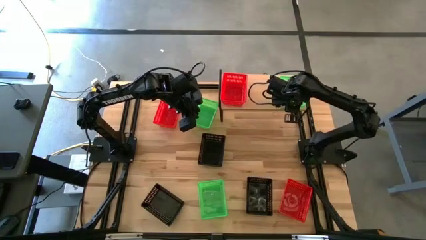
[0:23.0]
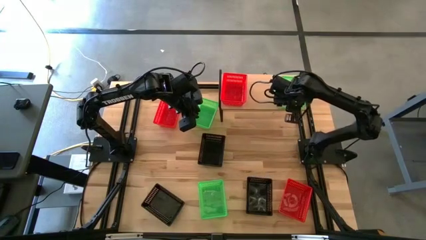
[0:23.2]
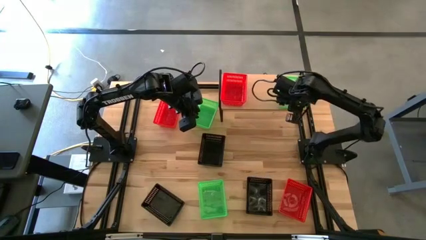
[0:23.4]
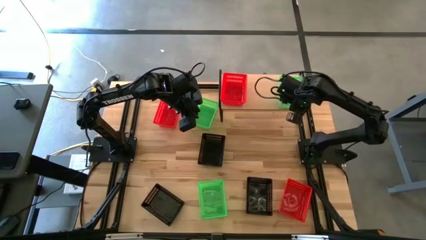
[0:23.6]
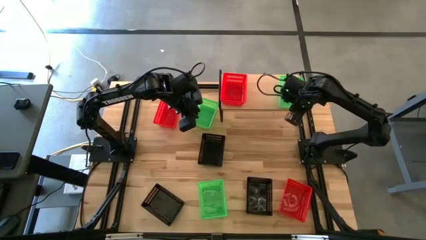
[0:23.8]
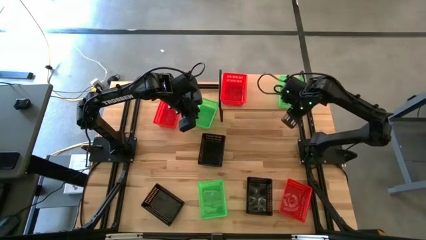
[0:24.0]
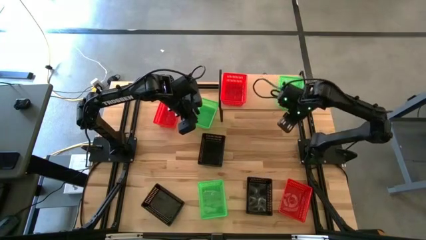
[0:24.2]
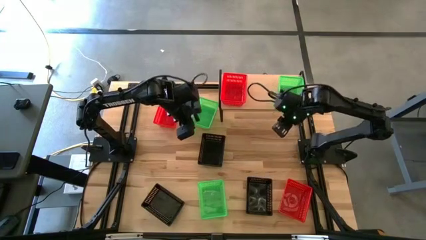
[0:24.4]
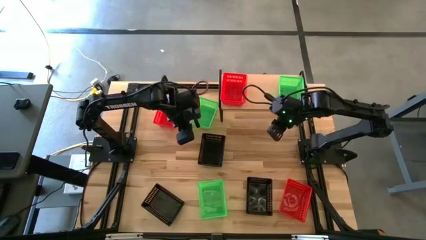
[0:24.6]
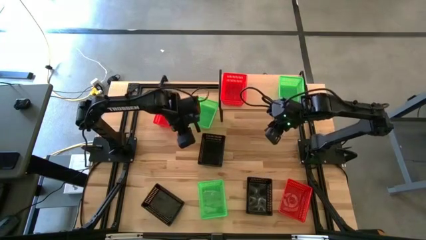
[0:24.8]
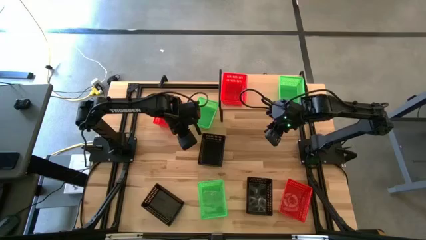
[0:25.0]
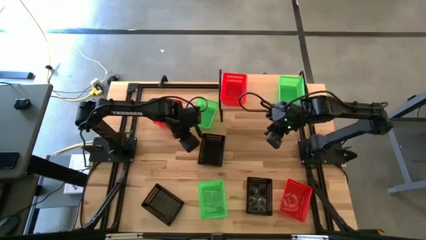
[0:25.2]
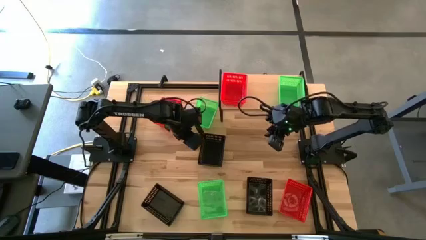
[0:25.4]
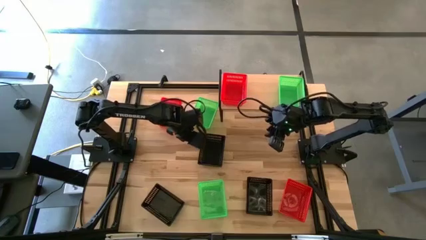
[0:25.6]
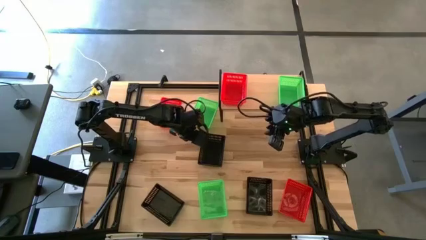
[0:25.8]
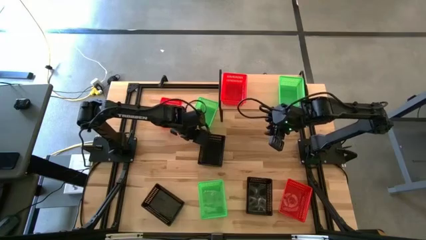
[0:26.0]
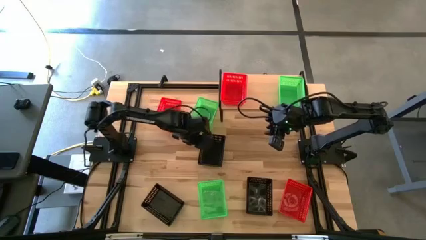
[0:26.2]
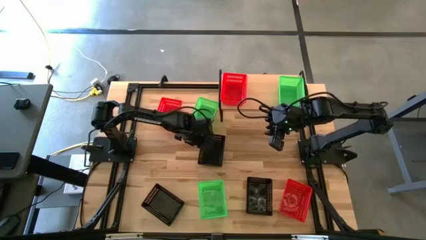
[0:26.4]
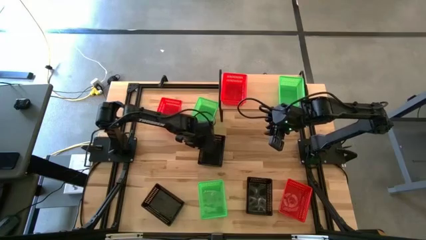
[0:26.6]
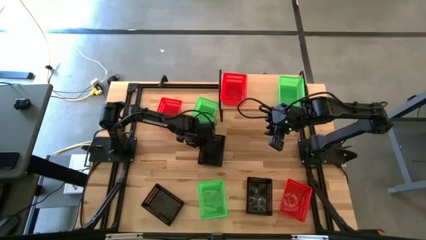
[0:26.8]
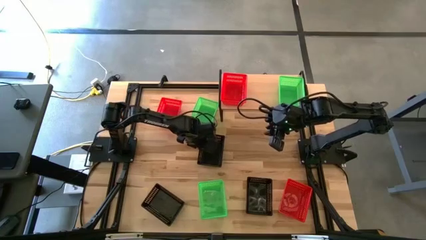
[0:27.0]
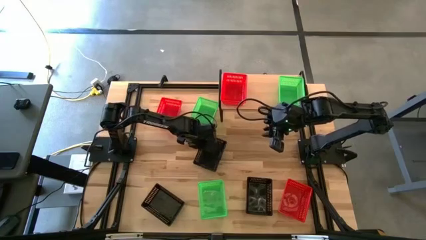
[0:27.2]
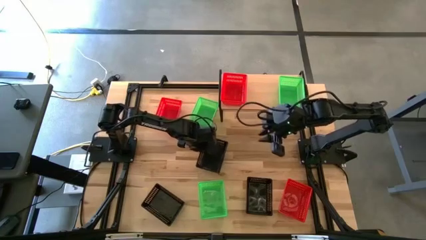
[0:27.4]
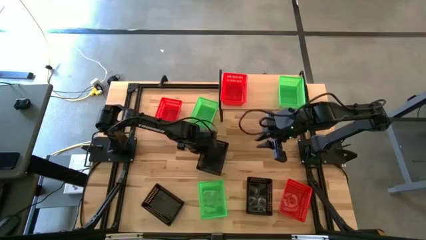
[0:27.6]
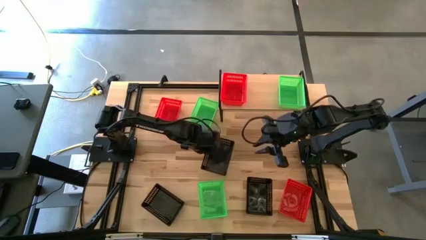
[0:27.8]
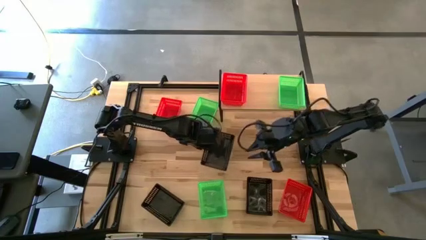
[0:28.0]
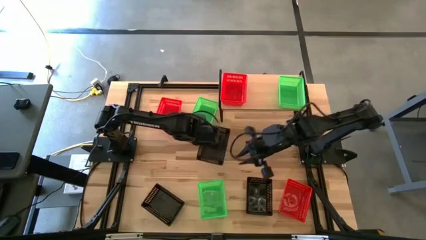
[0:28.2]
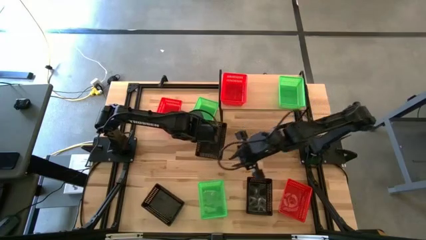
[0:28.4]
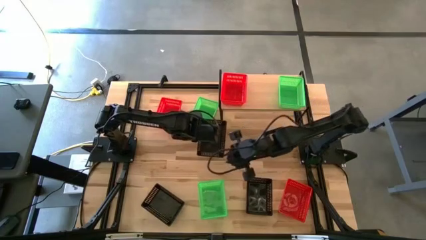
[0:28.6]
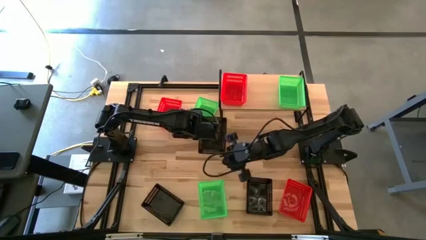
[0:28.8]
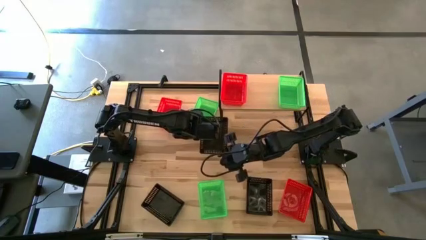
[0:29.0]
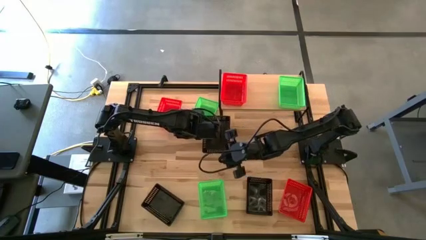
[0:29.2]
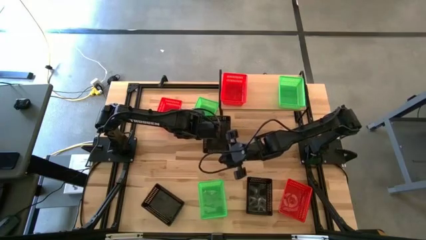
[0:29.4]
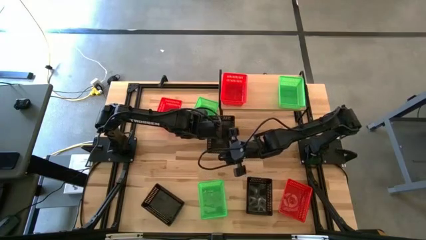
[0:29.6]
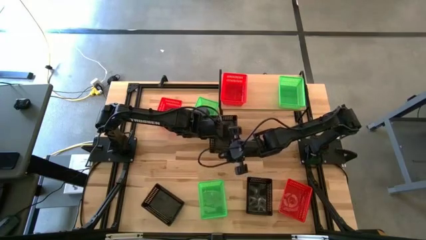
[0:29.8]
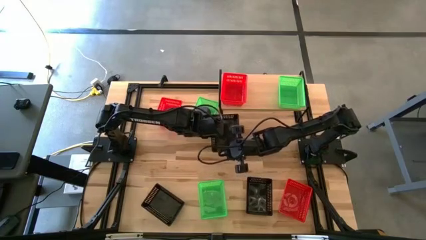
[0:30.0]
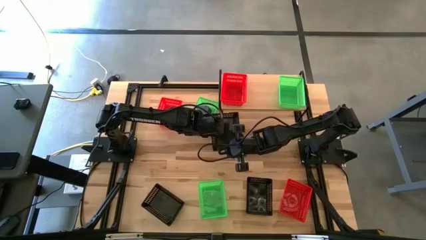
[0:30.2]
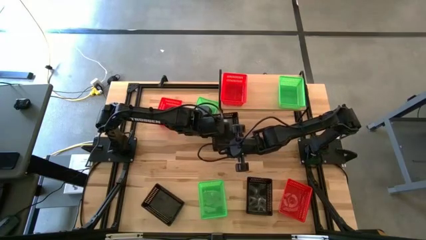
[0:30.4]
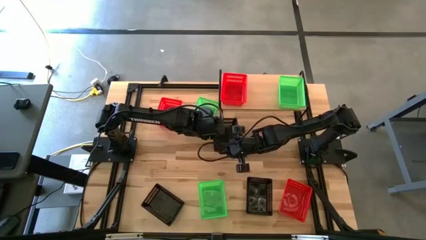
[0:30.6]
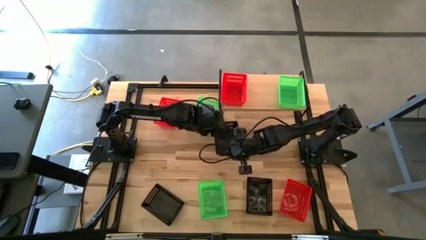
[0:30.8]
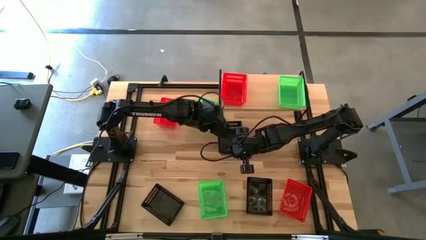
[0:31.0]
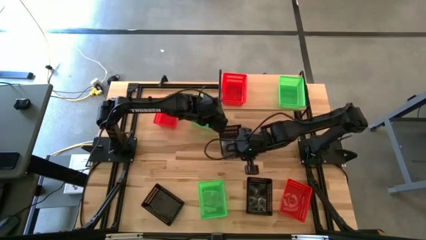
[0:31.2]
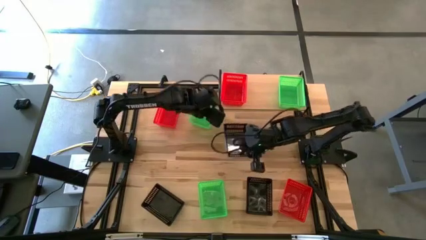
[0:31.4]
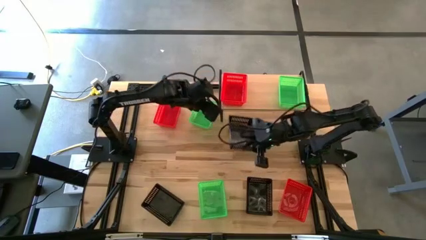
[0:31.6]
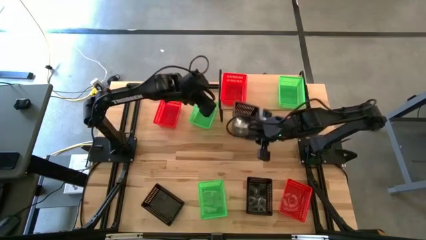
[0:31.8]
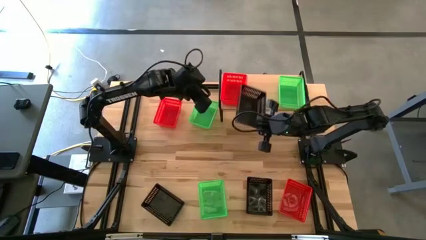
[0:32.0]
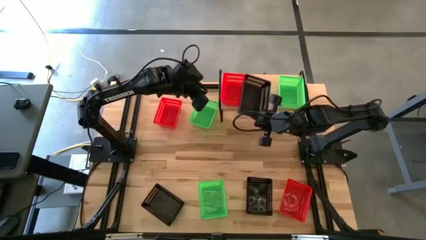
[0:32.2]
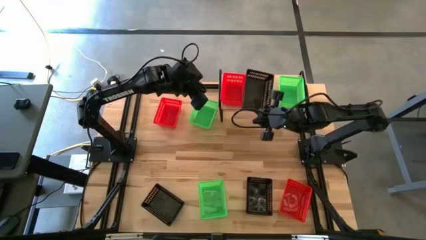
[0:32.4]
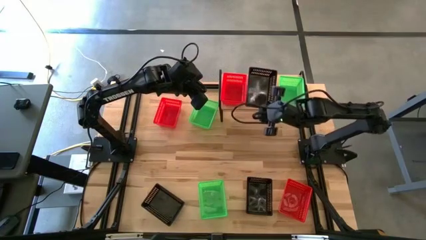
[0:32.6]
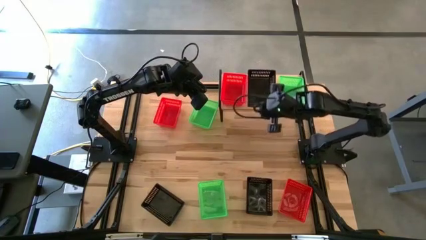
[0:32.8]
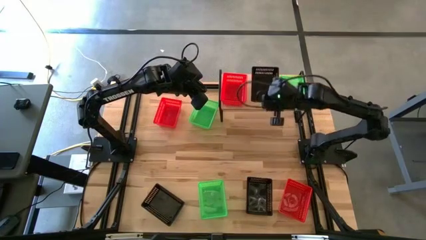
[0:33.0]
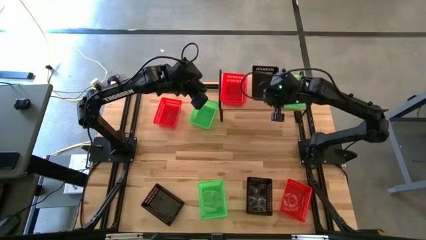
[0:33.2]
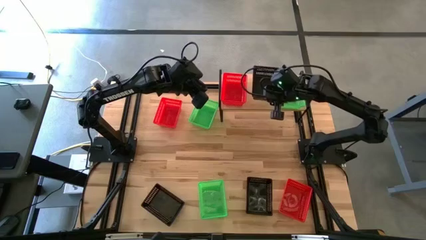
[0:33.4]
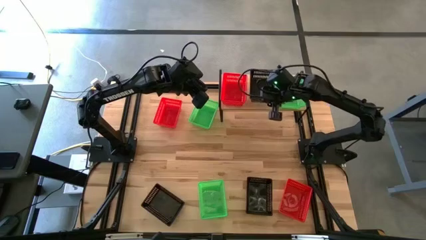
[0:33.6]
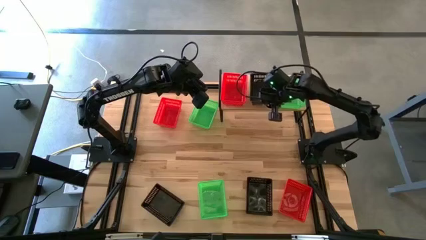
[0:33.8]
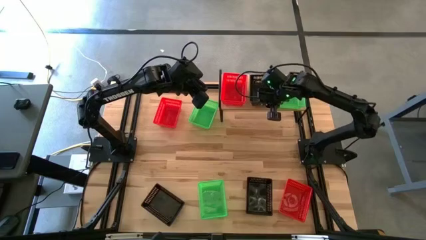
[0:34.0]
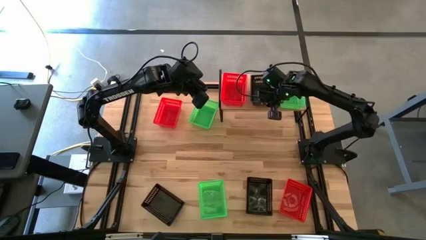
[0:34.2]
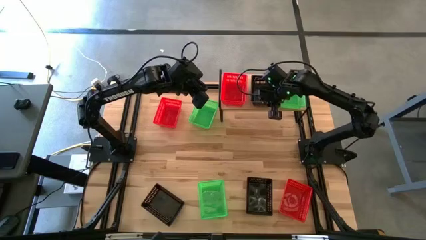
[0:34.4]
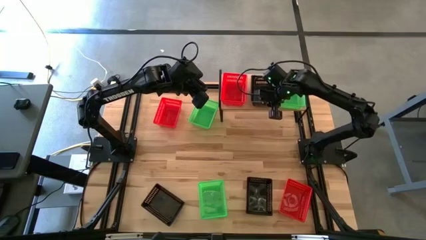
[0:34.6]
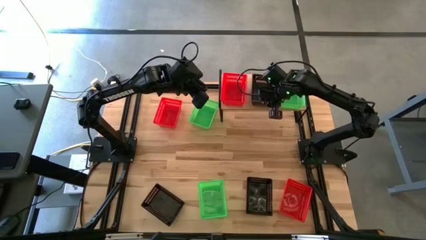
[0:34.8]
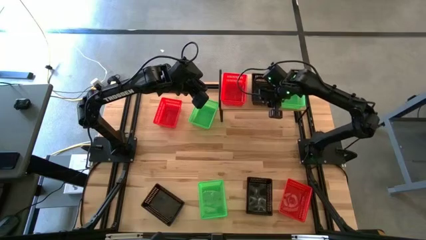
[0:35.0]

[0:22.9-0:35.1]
Task: Stack baskets on shelf by color
Put the top black basket on the shelf

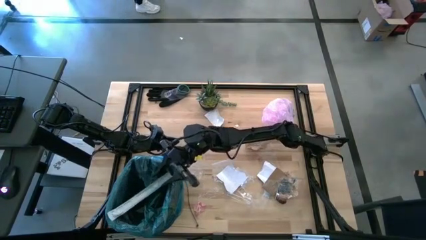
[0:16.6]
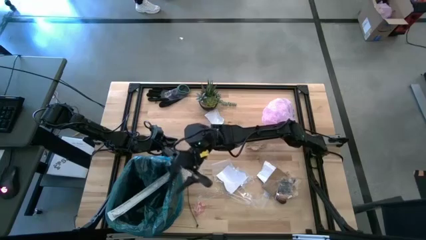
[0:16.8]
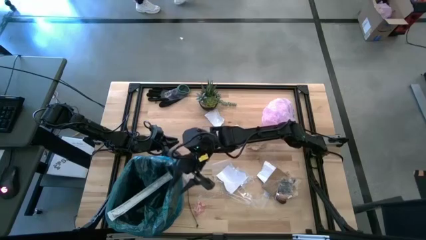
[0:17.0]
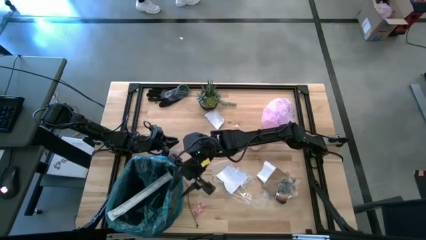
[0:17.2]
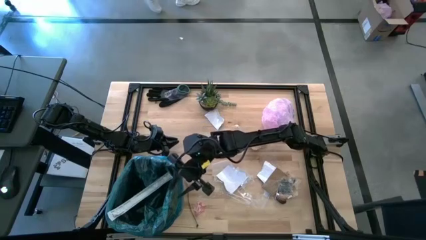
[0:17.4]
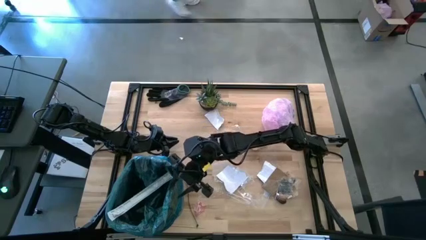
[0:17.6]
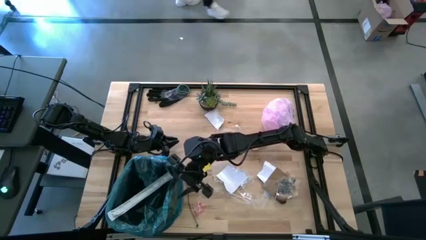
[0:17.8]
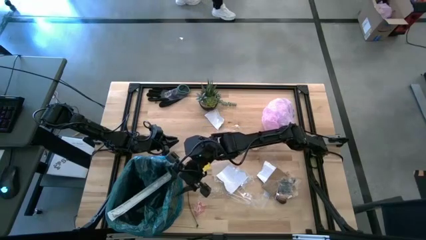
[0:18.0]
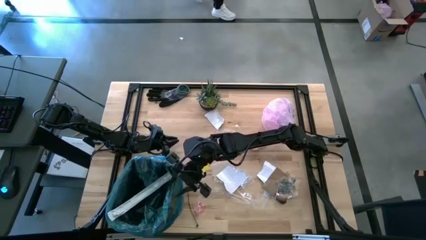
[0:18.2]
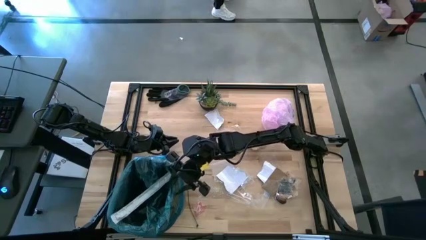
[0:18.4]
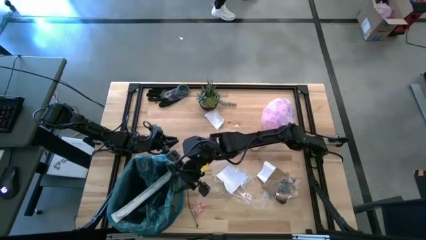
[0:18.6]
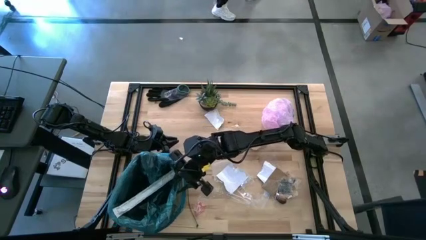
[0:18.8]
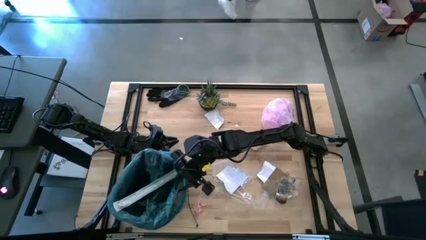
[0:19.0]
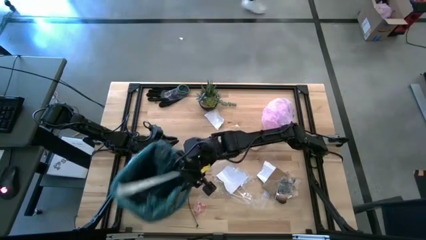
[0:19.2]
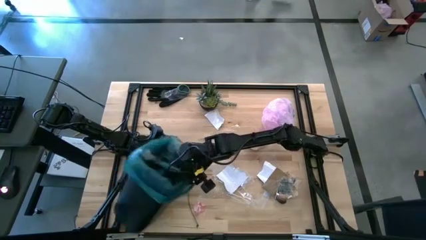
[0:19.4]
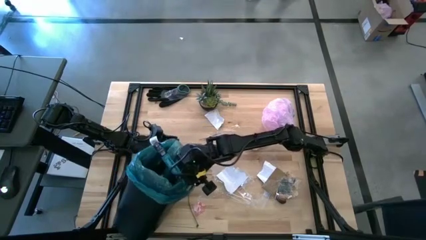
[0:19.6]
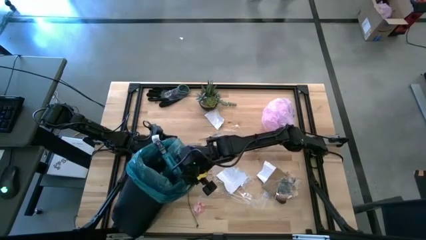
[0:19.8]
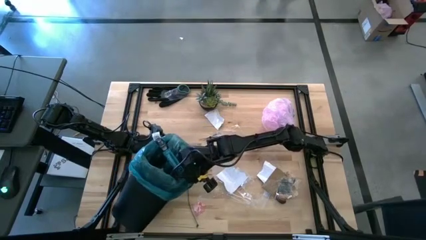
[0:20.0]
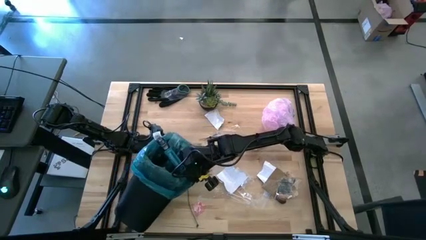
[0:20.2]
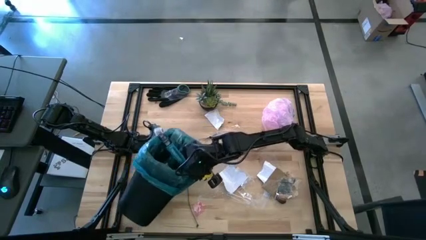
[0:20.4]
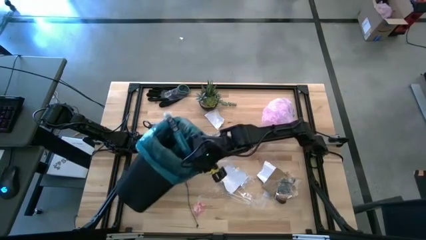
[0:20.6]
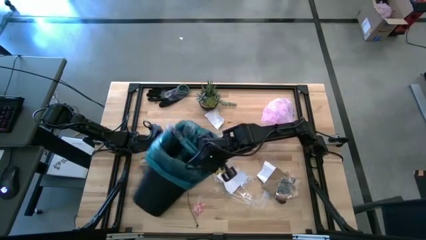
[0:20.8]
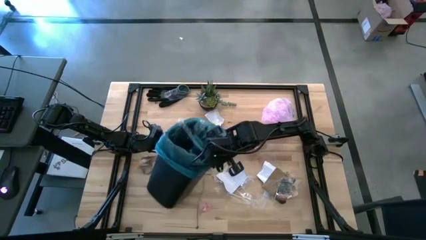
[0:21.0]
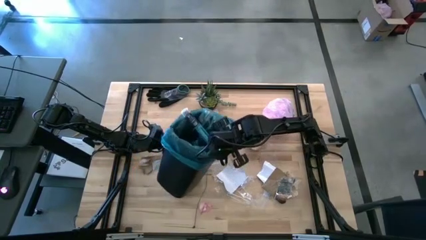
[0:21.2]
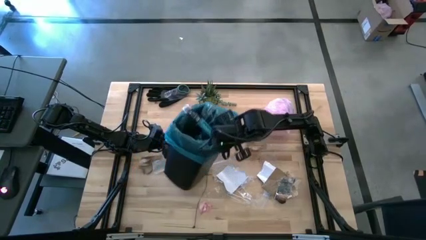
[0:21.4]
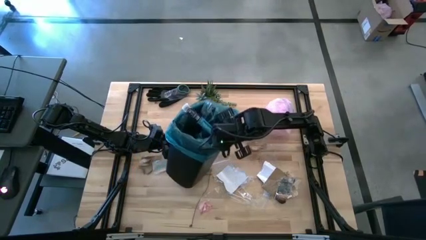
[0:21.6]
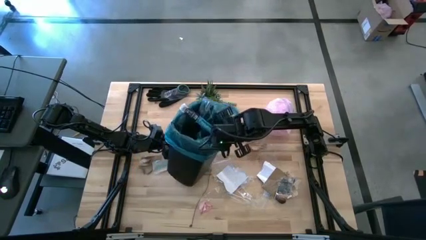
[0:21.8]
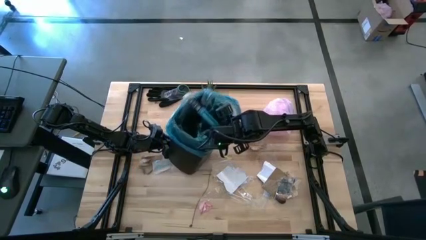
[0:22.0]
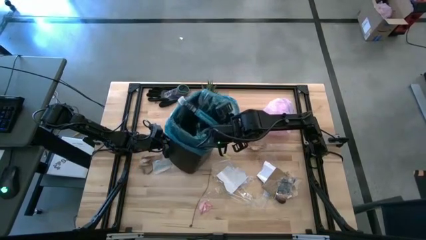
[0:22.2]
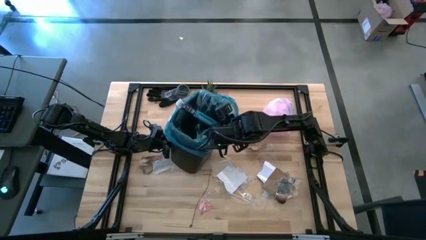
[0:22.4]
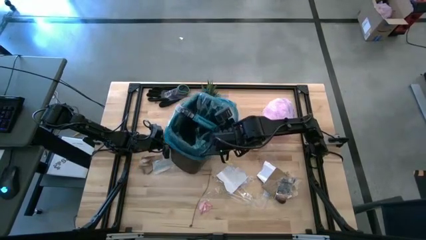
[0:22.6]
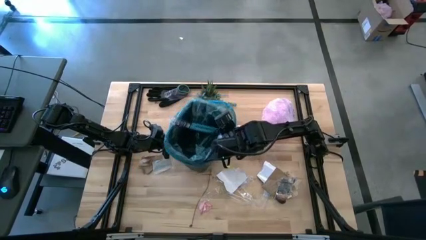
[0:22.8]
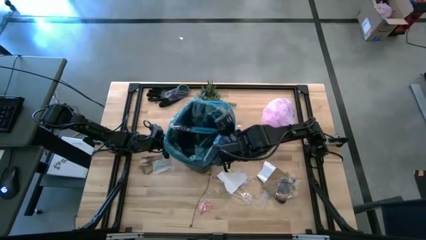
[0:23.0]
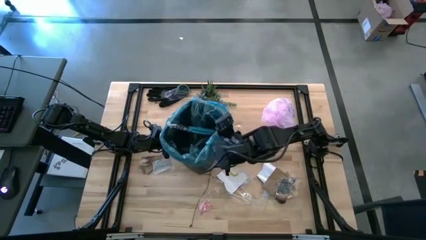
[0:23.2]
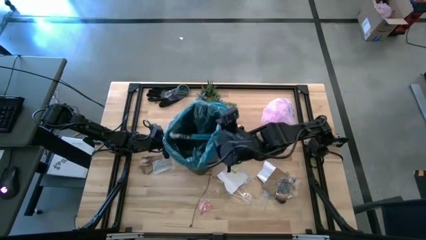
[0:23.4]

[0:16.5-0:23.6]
Task: place trash/remove bag and relplace
Move the trash bin into the center
